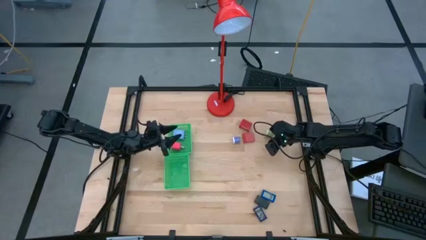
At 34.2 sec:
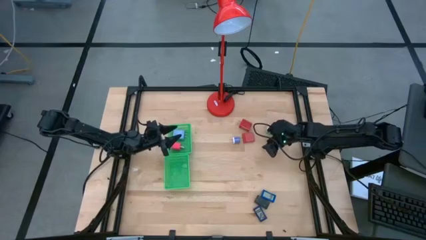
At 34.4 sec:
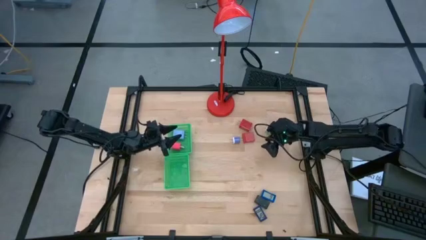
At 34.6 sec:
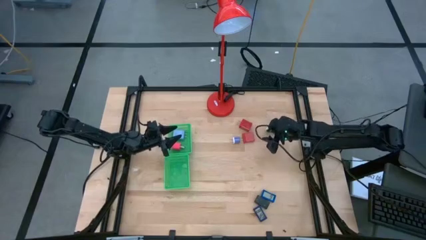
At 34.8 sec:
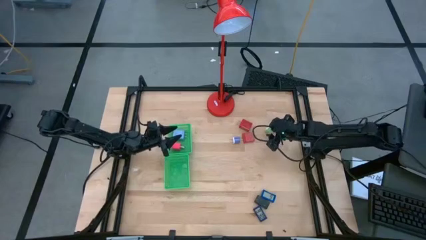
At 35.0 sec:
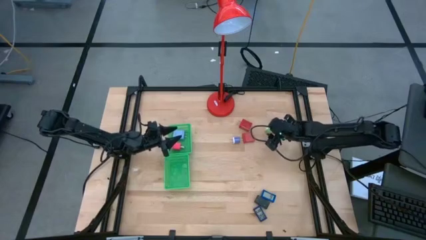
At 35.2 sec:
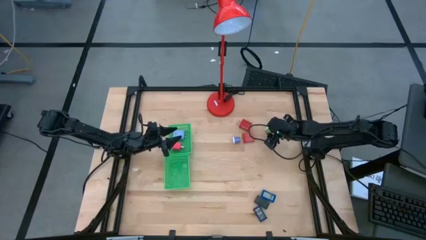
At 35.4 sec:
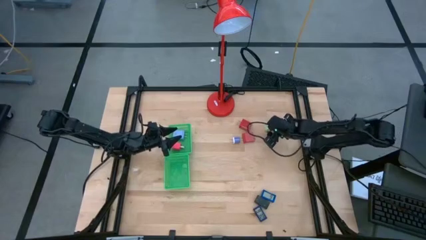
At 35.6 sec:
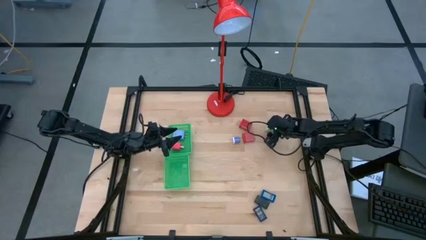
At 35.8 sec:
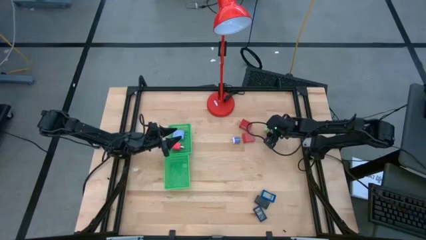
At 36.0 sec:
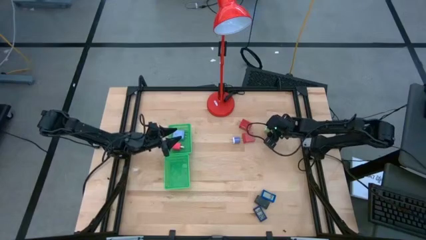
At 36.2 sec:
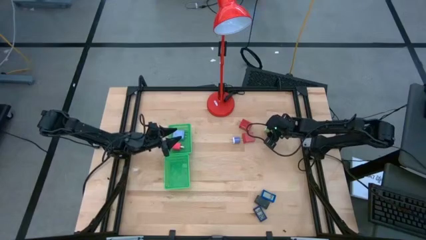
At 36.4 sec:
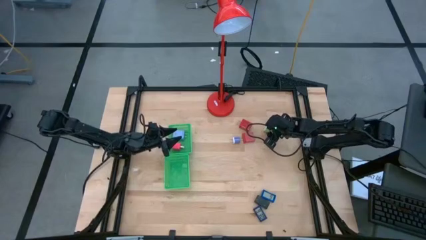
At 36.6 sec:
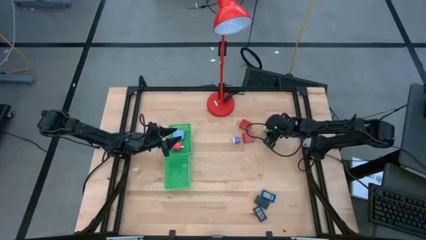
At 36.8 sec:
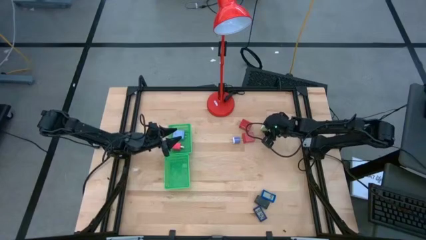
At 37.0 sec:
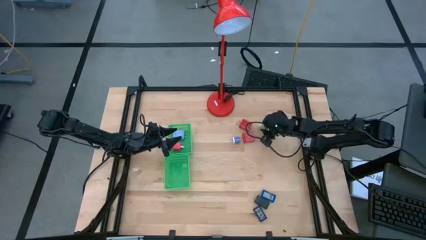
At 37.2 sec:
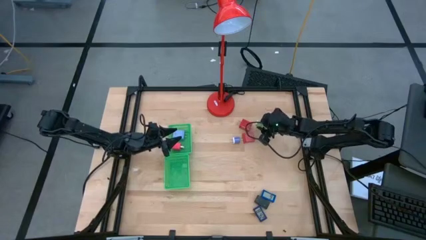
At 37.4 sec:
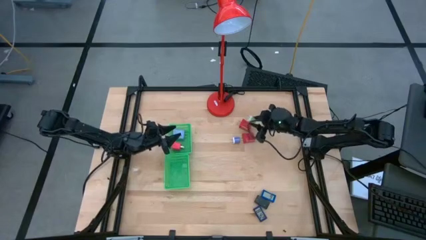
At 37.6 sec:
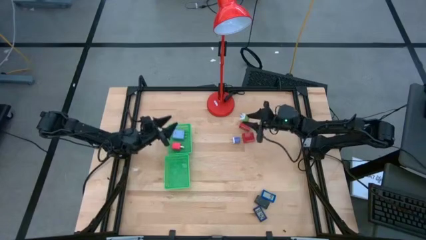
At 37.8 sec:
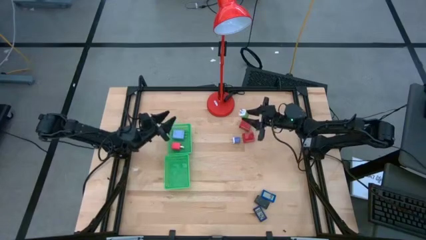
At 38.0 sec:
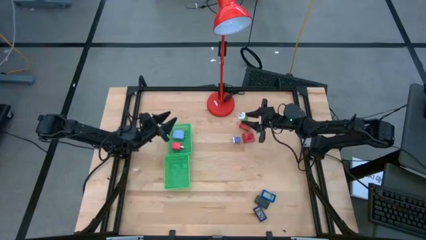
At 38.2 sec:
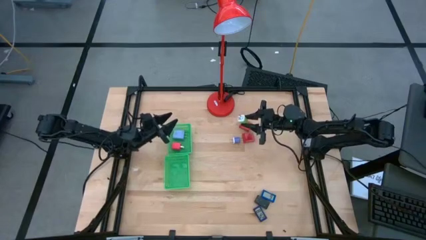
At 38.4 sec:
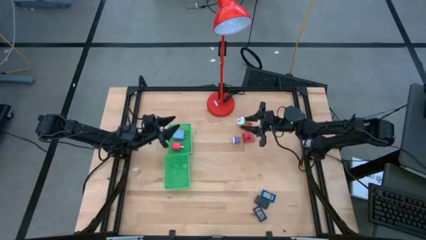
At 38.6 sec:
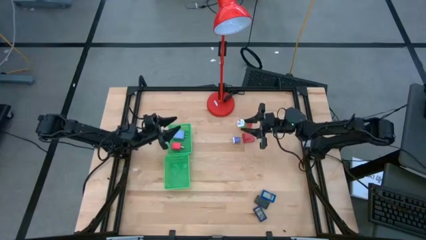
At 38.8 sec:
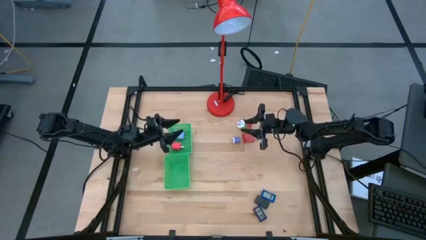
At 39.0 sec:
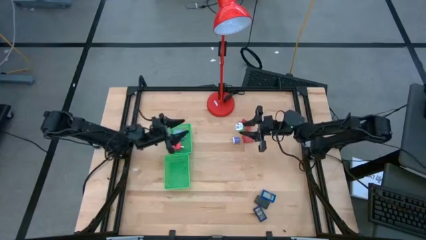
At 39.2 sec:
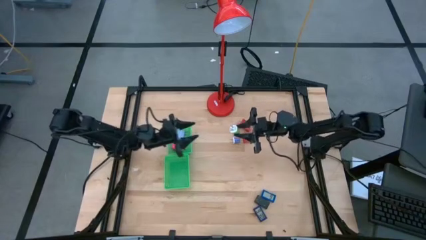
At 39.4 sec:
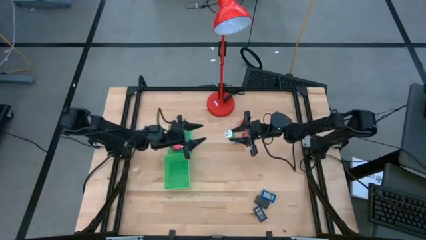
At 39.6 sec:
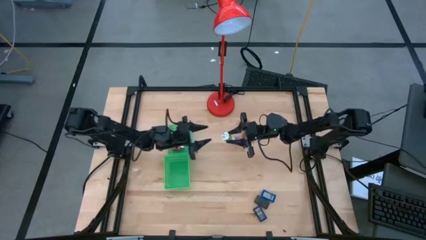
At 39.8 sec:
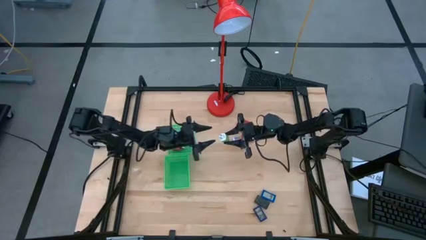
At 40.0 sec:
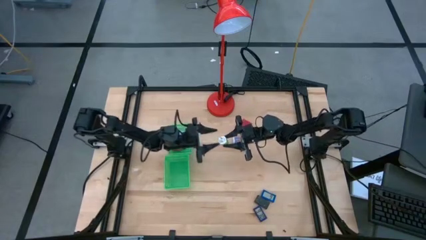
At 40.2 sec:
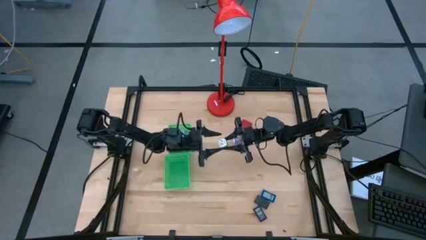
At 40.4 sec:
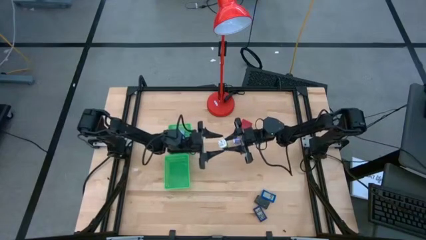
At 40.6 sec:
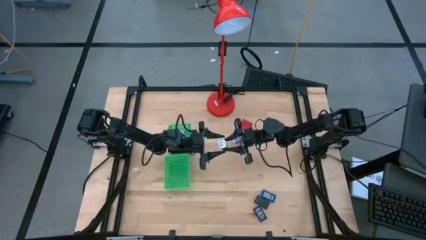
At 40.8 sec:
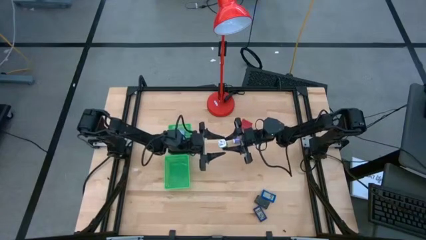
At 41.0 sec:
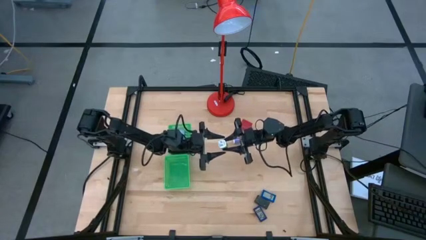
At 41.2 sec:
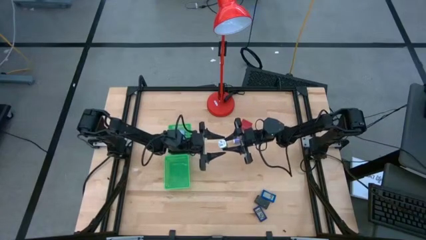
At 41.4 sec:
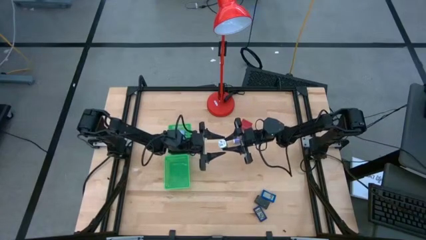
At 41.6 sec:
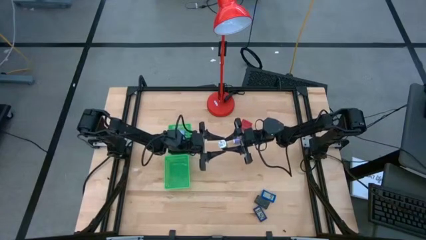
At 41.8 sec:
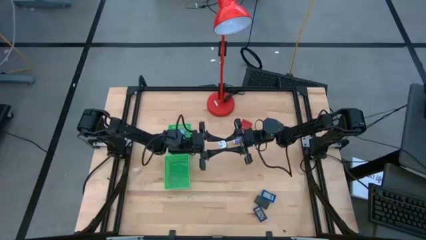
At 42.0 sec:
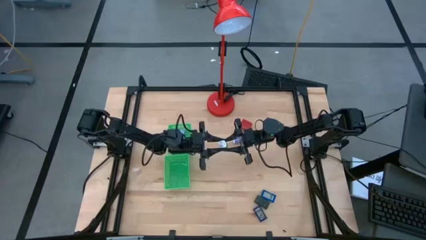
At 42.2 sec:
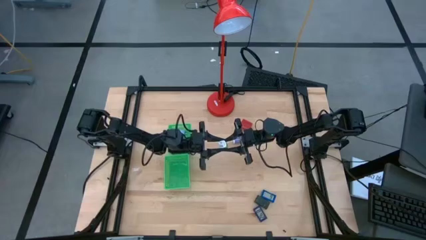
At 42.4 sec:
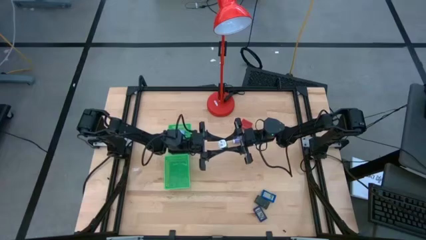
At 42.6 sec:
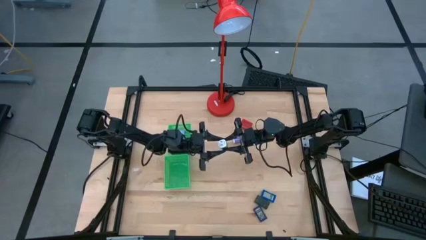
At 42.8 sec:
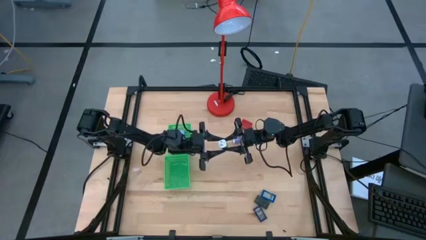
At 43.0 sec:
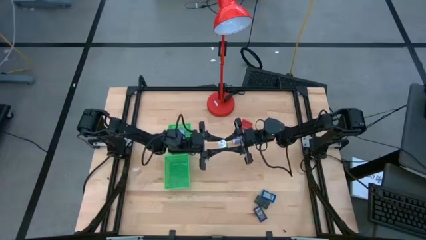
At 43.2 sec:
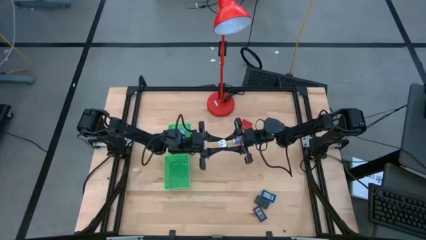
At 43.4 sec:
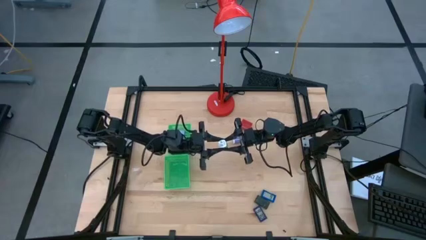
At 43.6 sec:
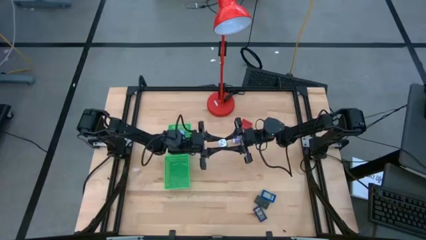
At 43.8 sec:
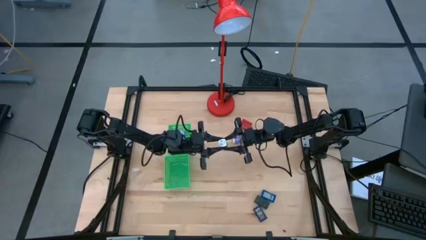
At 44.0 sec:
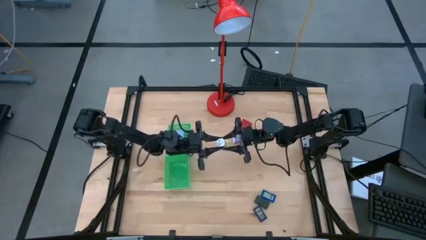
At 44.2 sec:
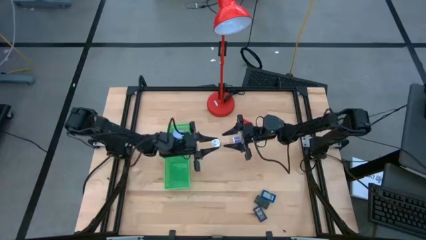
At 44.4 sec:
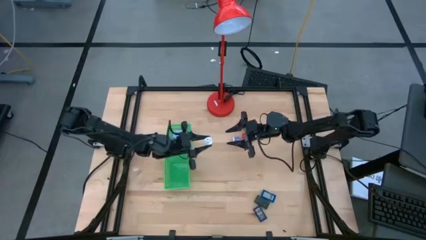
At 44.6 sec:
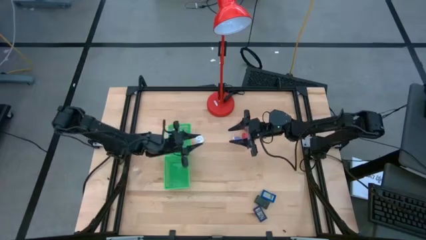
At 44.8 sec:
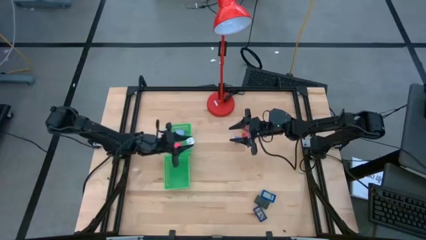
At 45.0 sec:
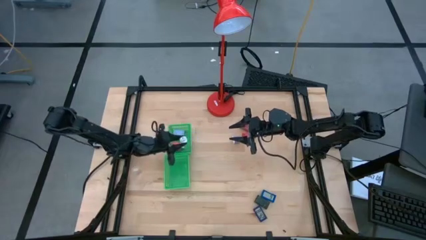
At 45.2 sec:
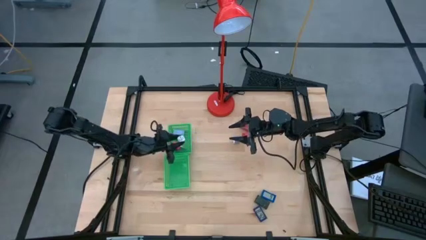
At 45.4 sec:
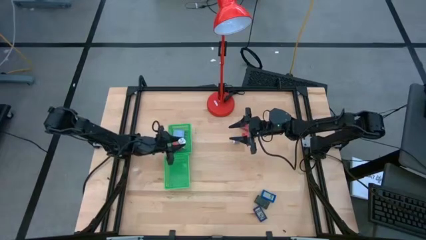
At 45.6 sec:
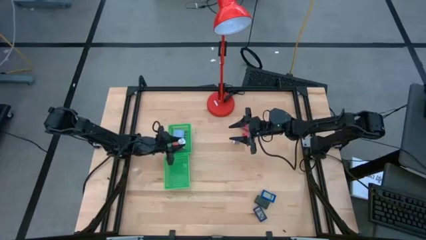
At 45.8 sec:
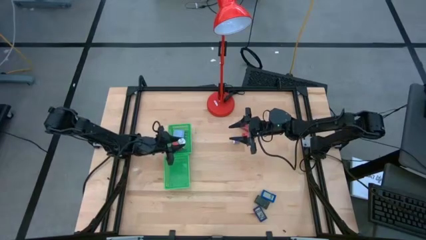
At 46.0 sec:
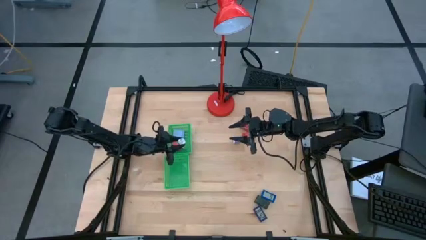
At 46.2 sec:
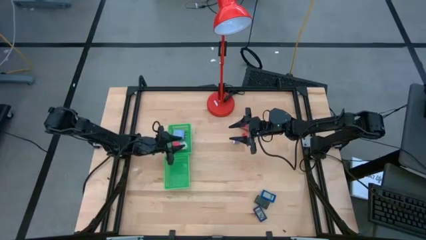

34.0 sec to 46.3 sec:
Task: Pick & Place Office items
Put the green charger adapter into the top green bin
